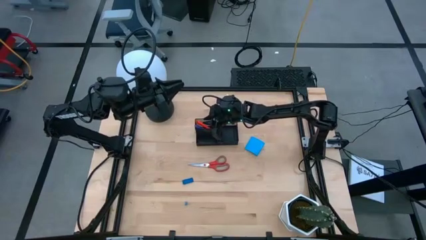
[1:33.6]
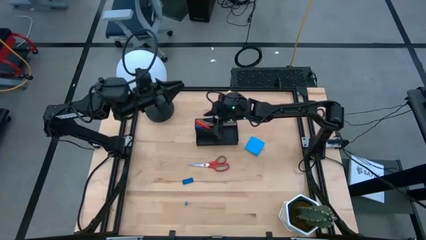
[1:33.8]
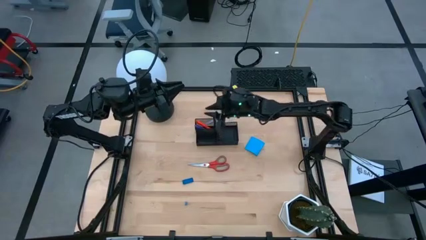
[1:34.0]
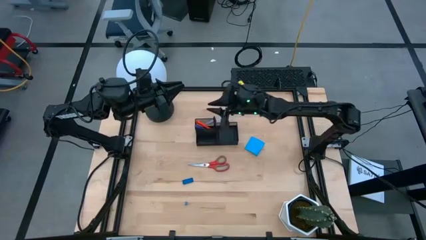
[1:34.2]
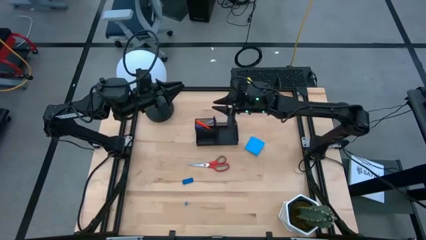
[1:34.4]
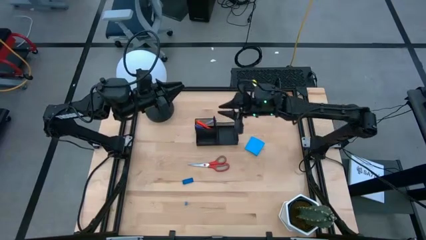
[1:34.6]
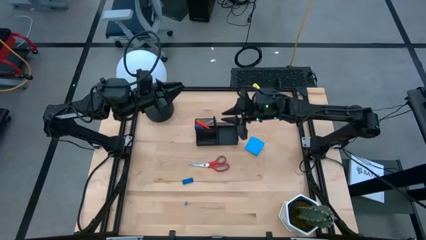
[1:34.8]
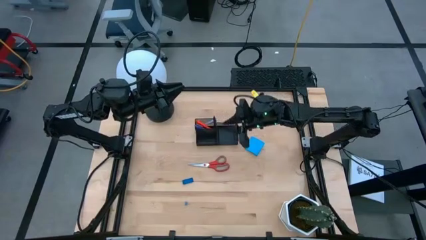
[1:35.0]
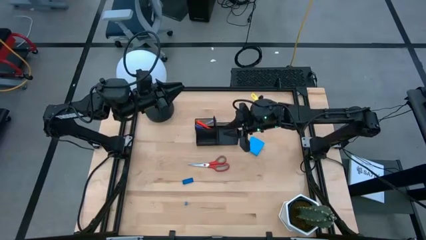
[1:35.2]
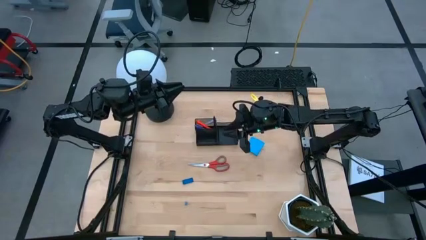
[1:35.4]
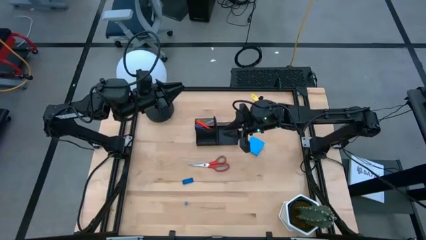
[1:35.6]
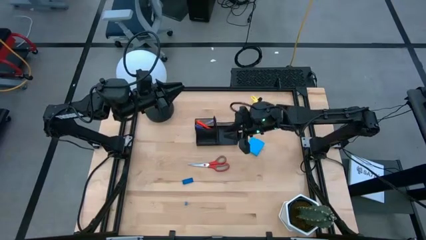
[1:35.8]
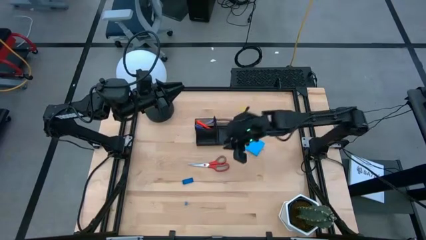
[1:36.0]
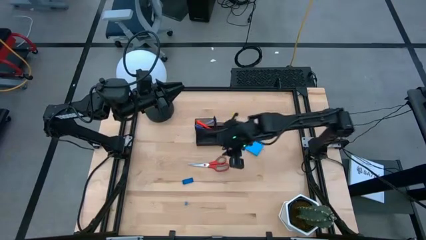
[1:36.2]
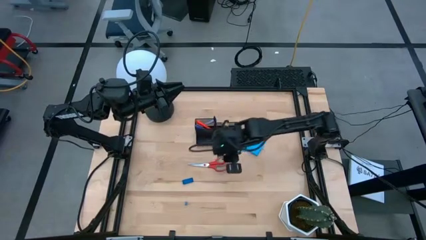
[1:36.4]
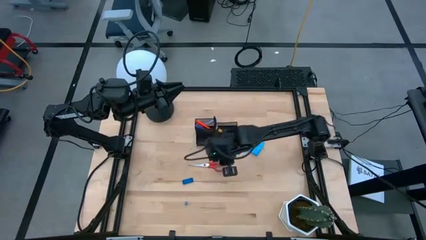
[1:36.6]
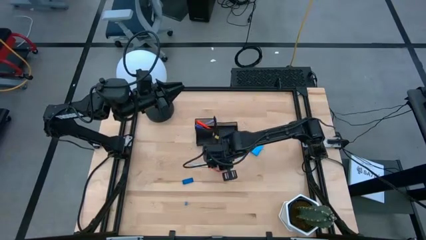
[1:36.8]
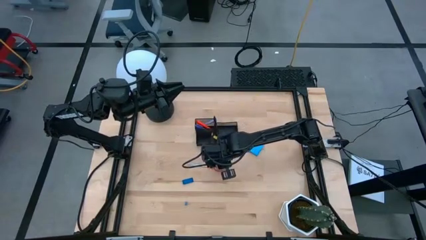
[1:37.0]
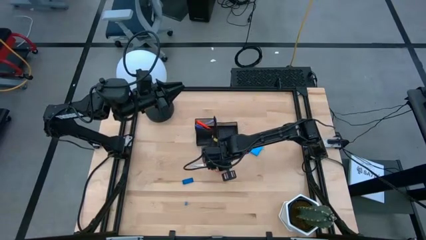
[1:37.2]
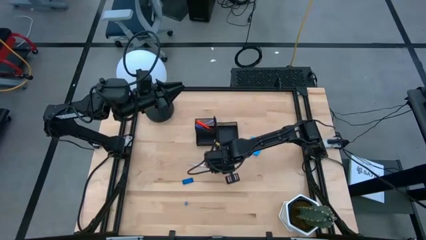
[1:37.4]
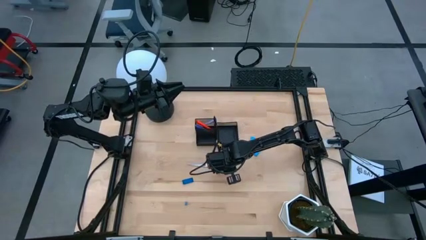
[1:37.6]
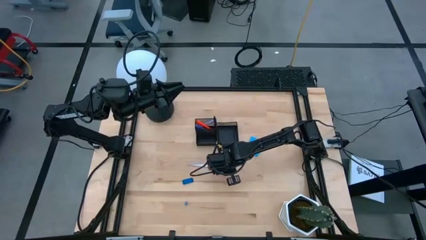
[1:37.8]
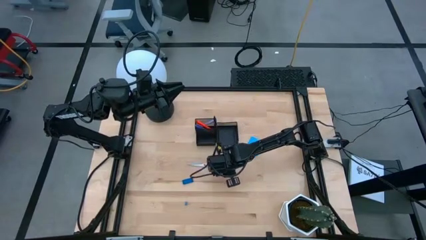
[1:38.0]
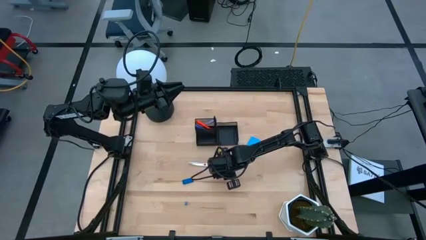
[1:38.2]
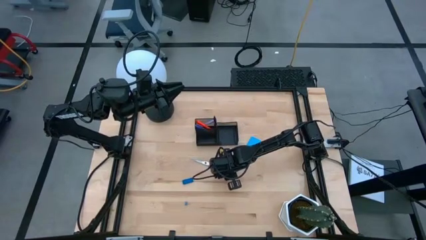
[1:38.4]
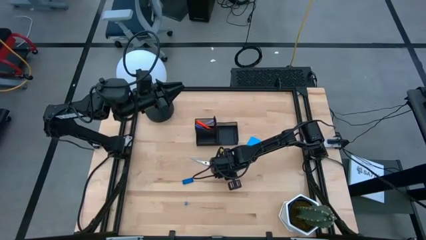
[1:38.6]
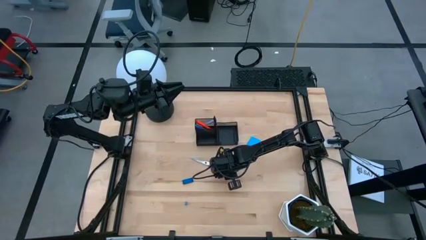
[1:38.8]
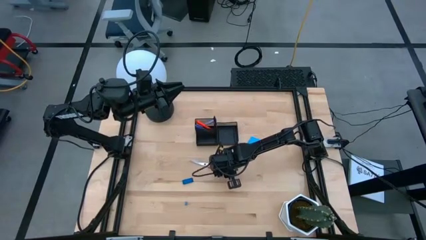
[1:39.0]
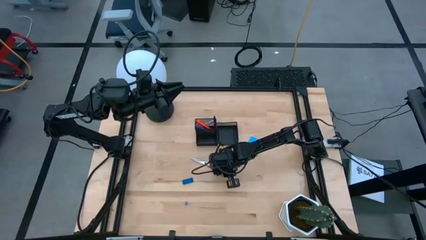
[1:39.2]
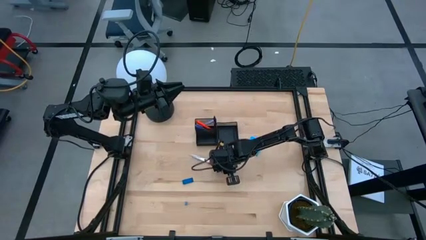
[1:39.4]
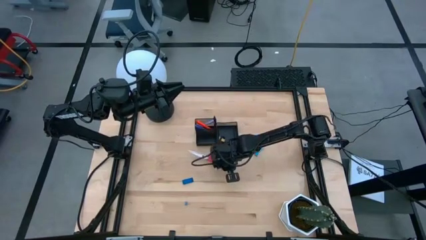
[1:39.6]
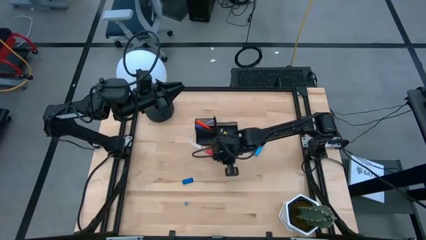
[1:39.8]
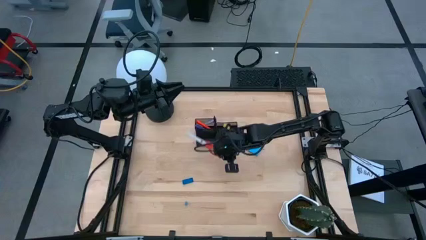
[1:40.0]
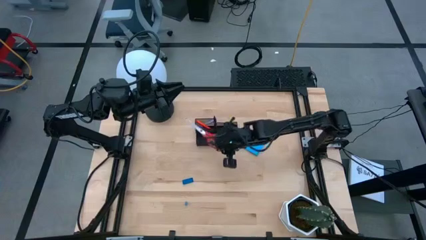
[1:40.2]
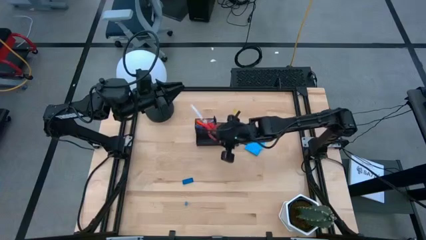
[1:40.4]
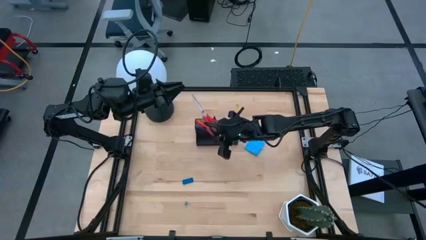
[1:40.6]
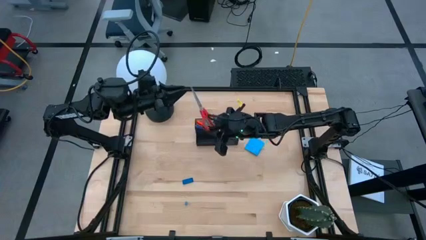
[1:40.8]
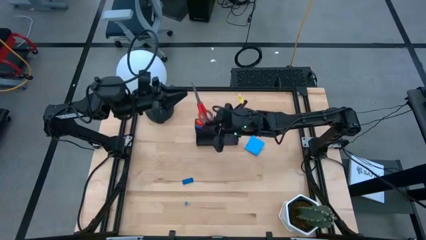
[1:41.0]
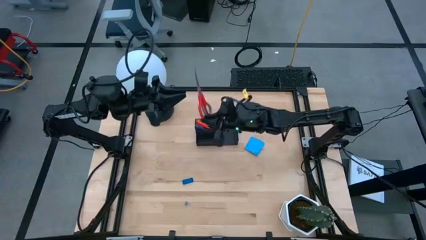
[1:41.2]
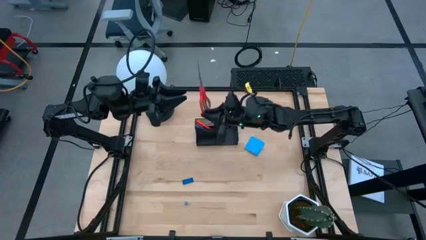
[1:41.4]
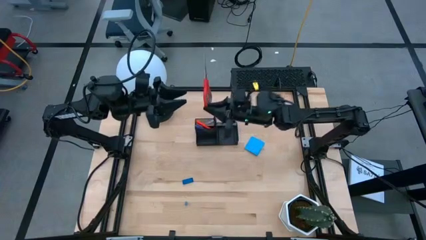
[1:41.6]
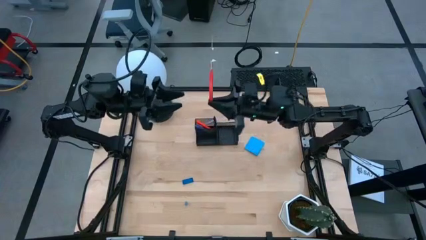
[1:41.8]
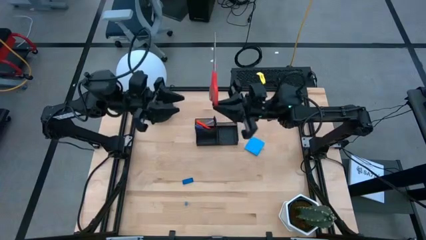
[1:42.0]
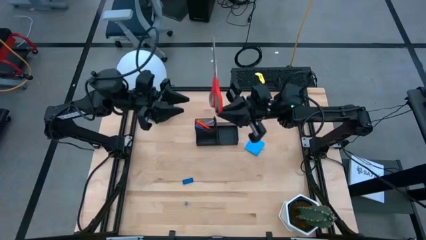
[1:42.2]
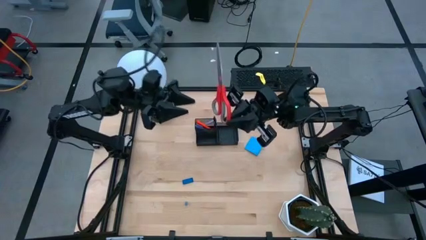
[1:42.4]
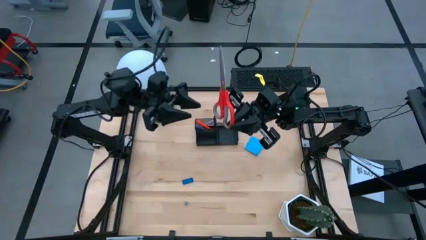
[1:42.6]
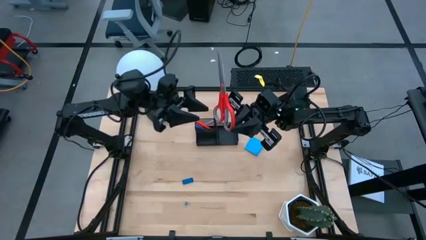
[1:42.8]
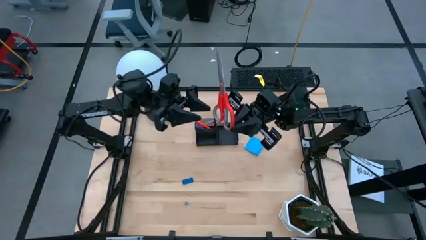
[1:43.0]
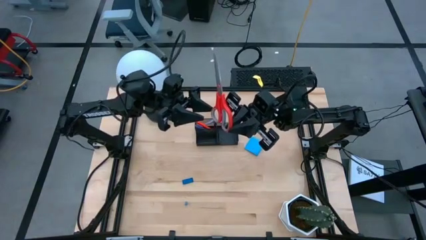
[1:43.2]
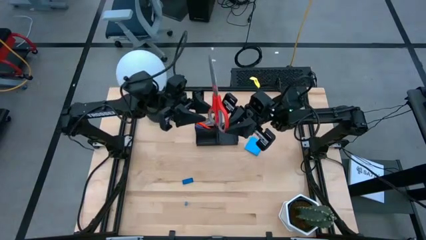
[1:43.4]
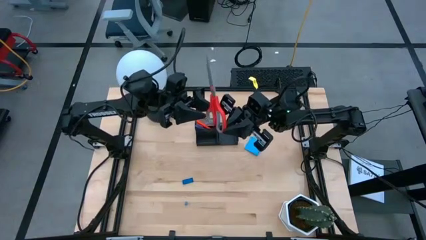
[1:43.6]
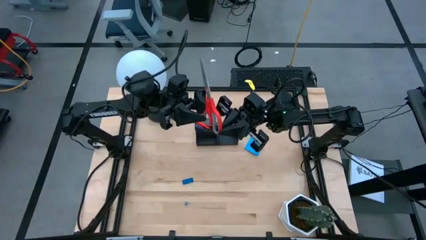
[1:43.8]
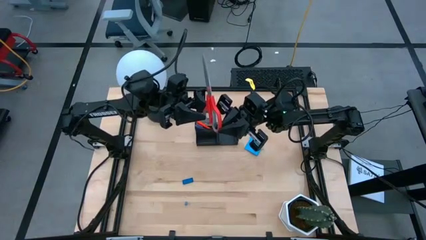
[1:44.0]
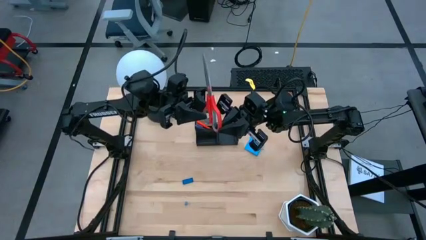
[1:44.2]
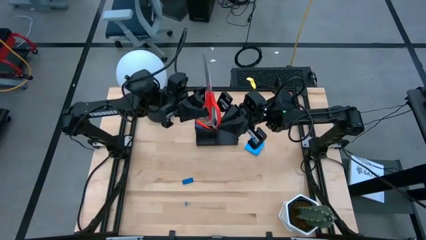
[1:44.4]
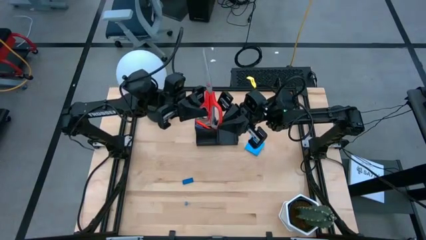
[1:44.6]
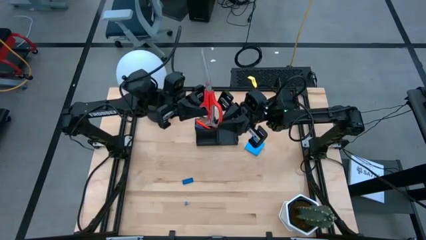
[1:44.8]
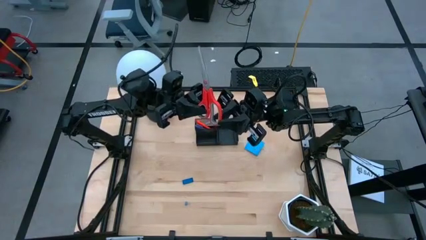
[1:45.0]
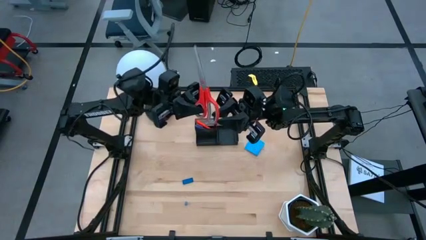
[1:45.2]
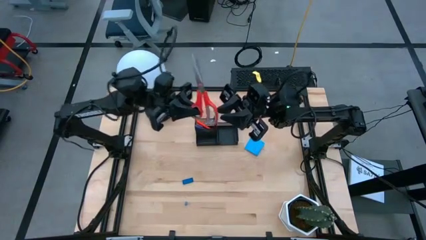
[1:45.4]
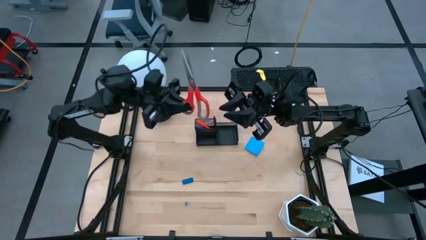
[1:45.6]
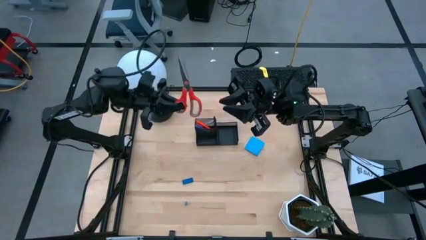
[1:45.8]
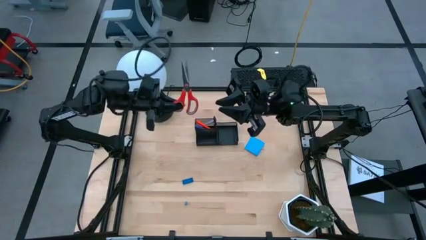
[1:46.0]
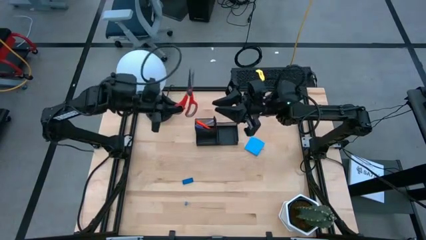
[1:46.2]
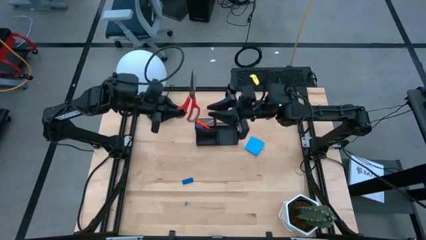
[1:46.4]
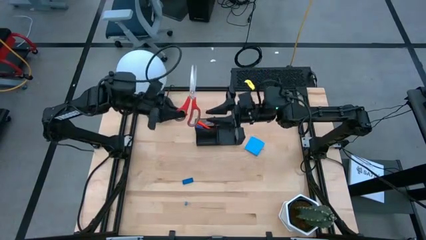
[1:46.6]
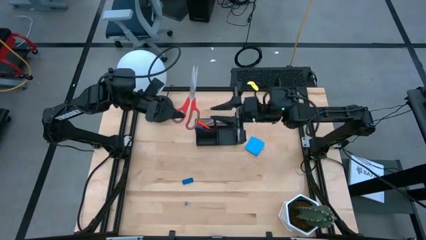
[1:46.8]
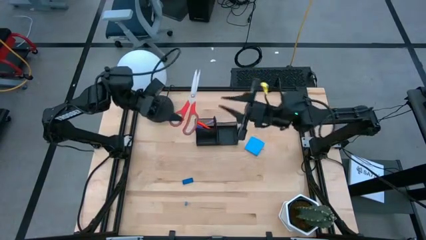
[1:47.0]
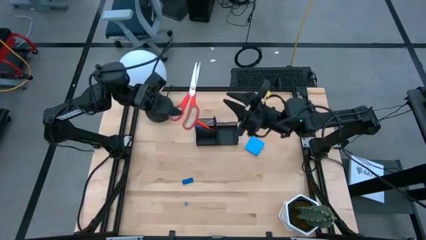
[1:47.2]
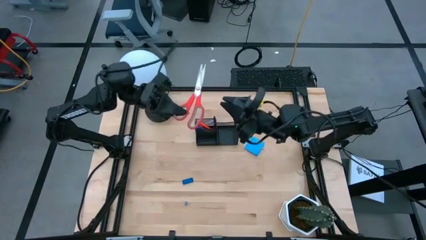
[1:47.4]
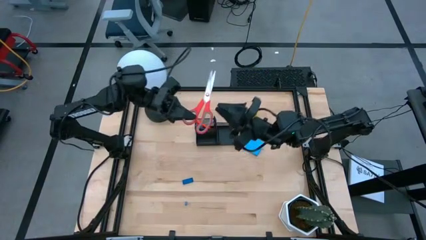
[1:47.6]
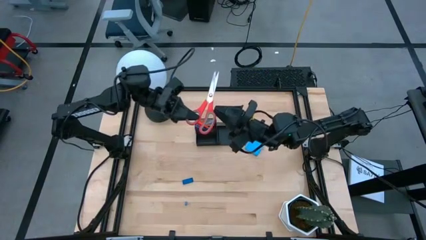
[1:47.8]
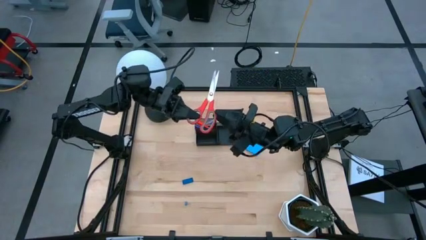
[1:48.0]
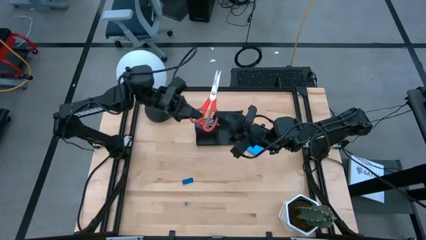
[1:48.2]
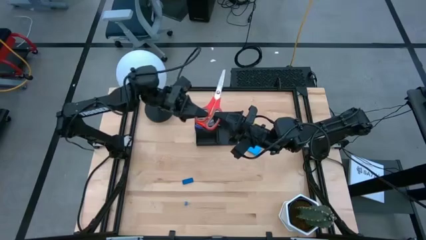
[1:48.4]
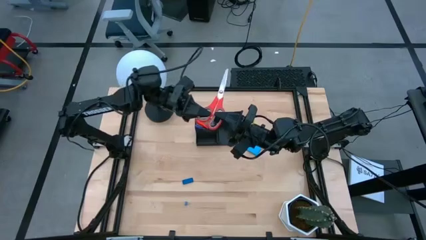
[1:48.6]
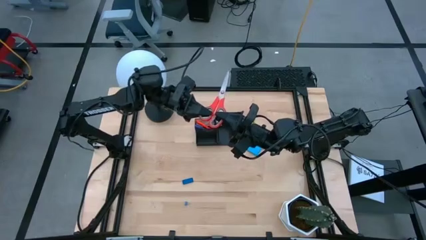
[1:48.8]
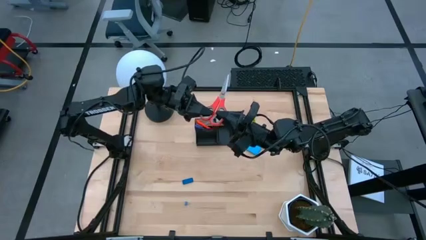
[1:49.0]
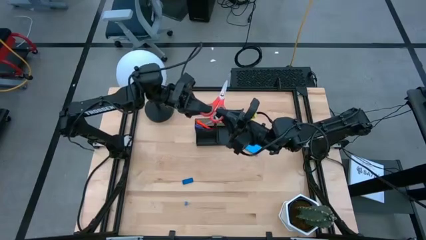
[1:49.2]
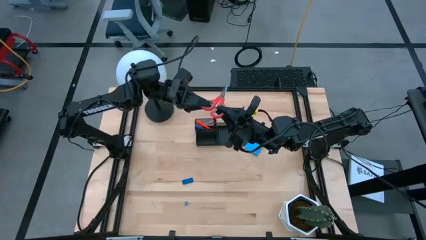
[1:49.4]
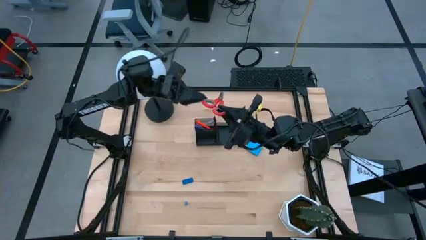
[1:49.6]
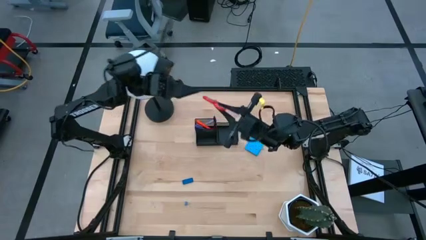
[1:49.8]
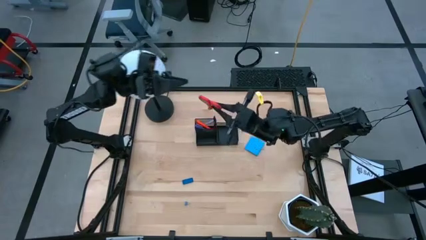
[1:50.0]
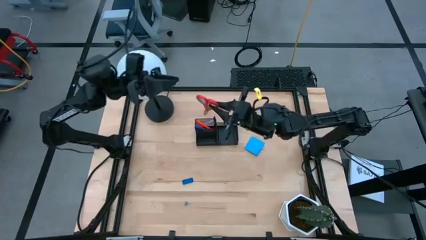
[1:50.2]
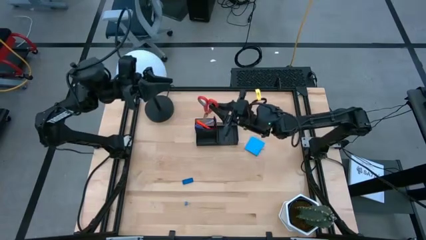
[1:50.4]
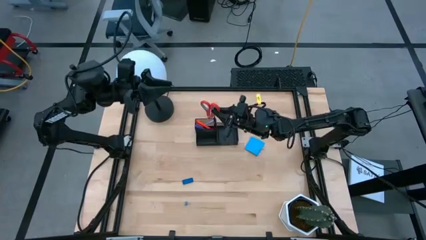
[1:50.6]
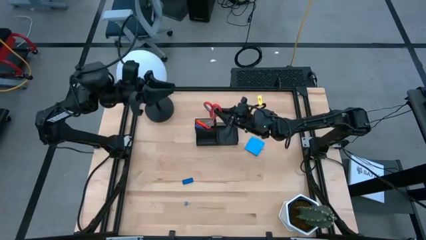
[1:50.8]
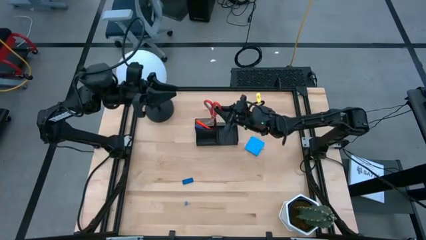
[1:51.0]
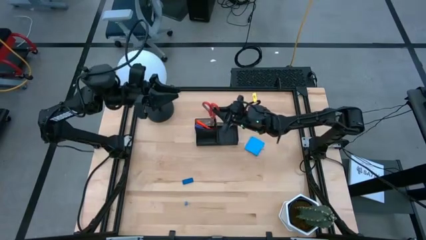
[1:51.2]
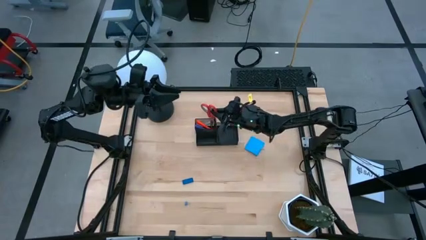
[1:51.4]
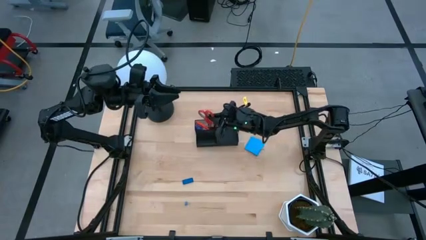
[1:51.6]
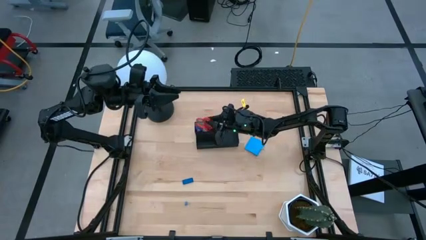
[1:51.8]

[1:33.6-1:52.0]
Task: Pick and place office supplies into organizer
Put the orange scissors into the black desk organizer
